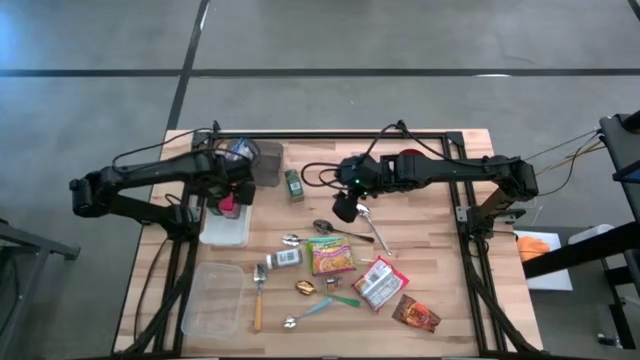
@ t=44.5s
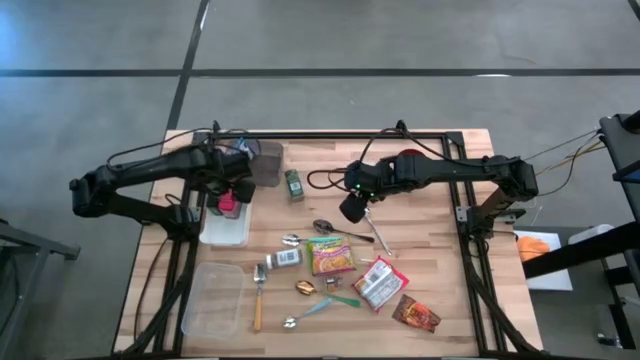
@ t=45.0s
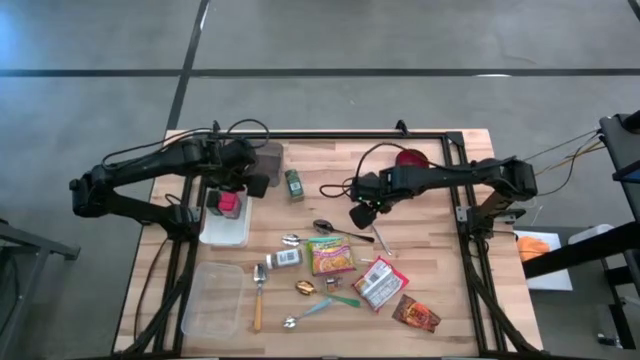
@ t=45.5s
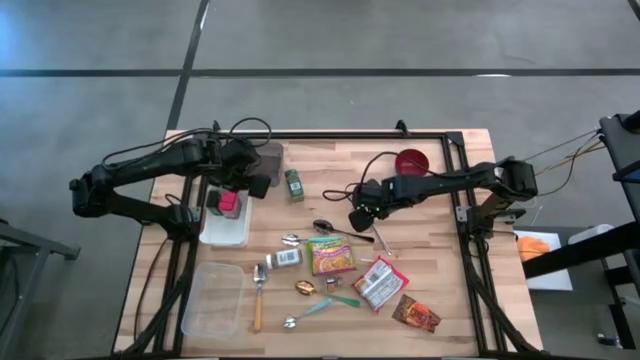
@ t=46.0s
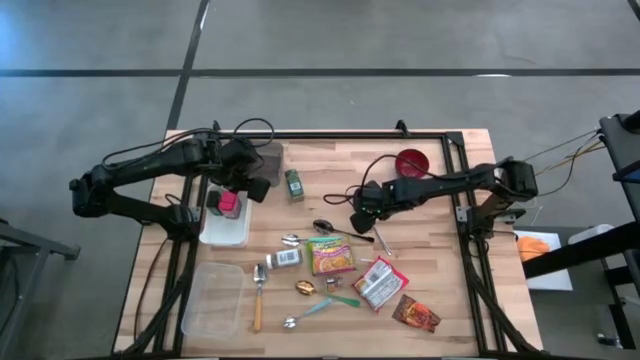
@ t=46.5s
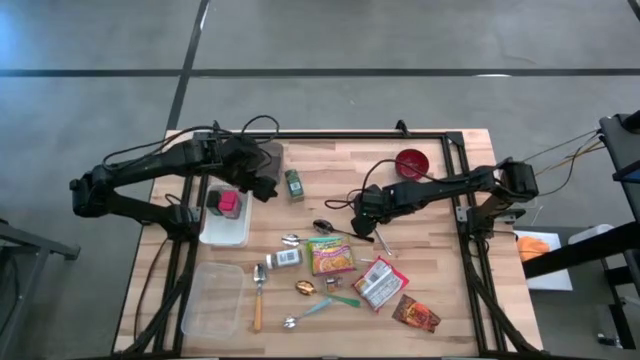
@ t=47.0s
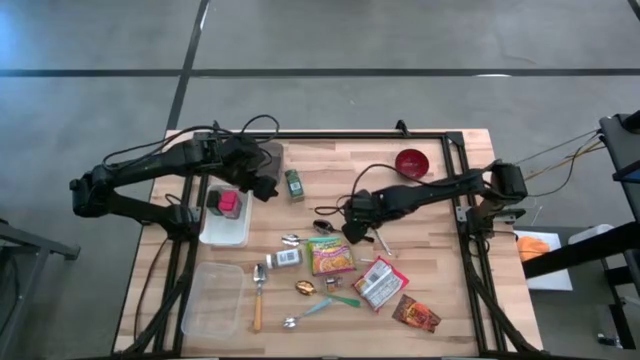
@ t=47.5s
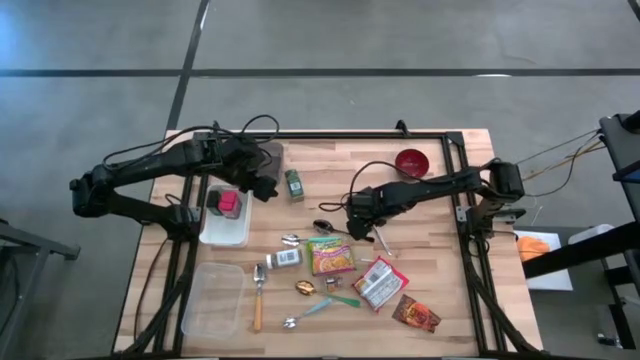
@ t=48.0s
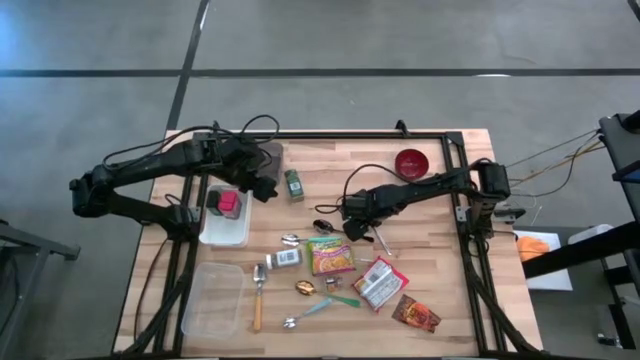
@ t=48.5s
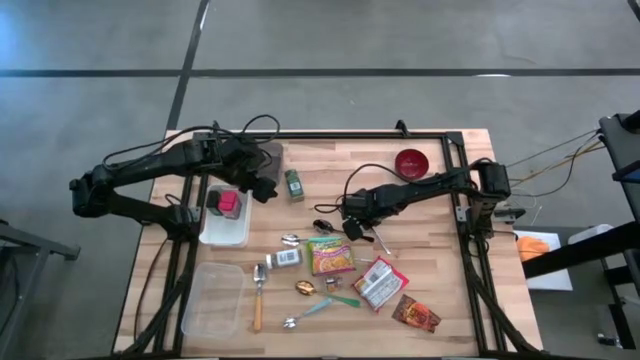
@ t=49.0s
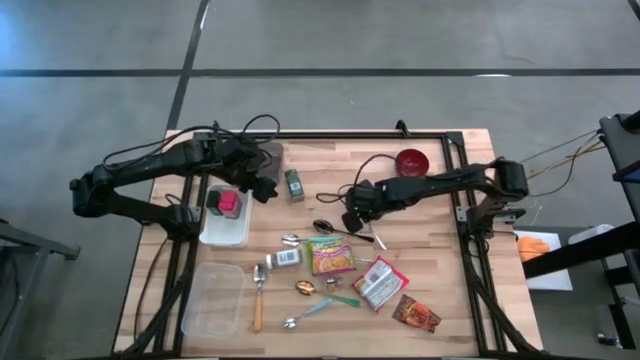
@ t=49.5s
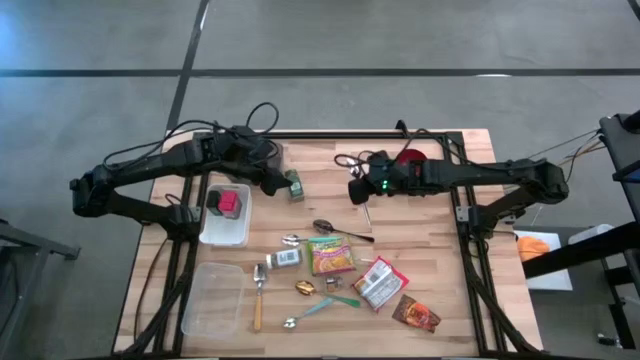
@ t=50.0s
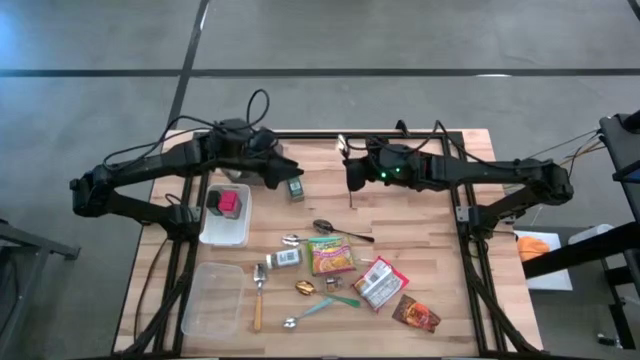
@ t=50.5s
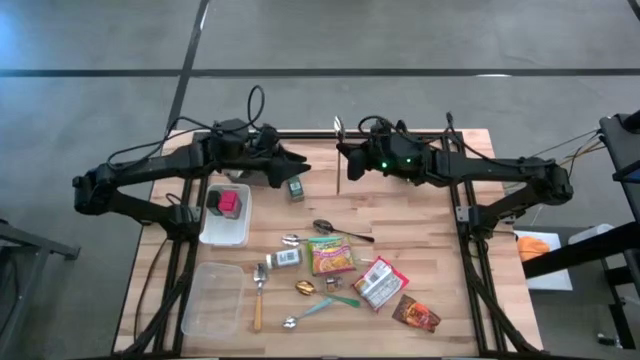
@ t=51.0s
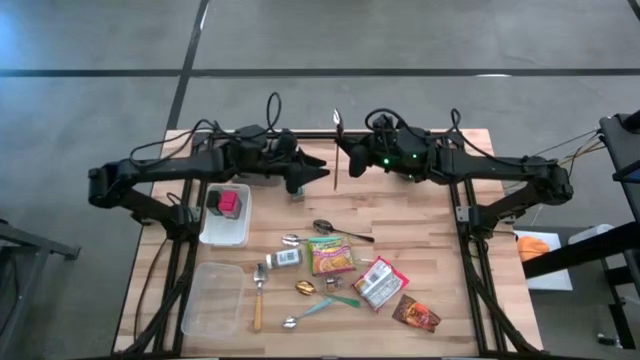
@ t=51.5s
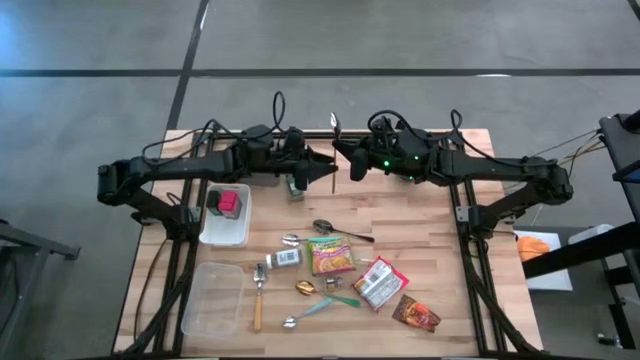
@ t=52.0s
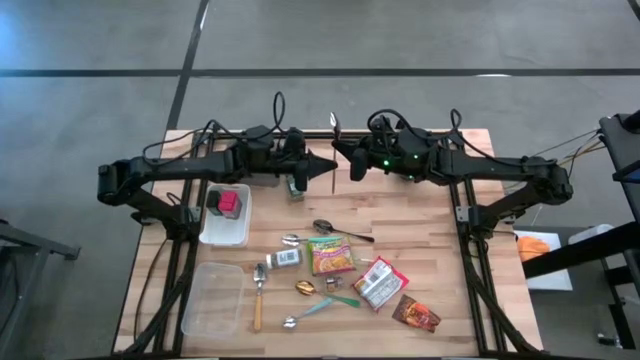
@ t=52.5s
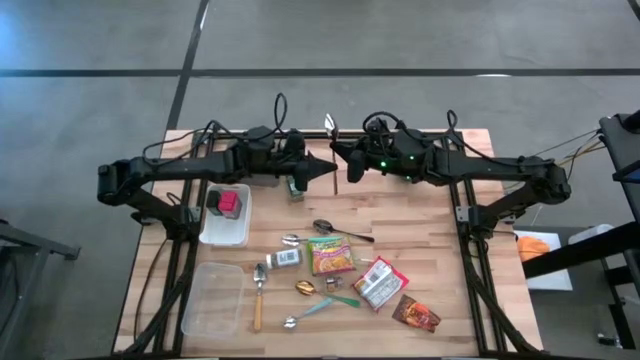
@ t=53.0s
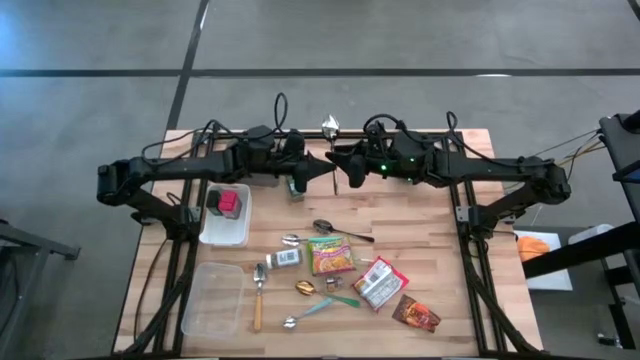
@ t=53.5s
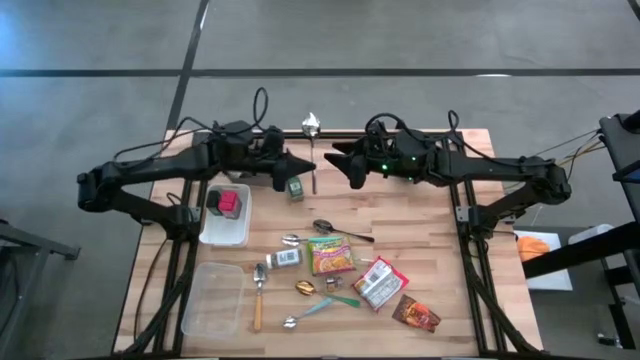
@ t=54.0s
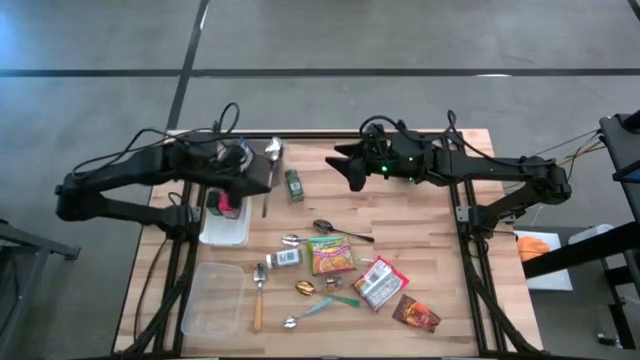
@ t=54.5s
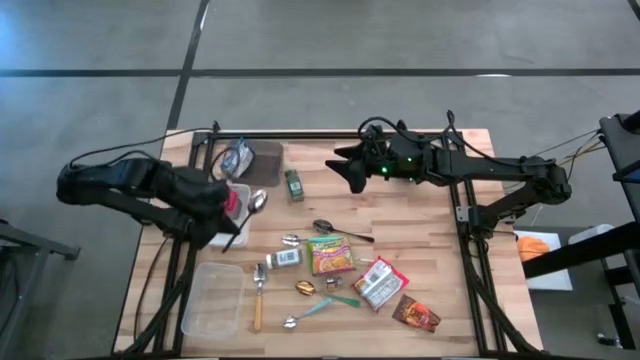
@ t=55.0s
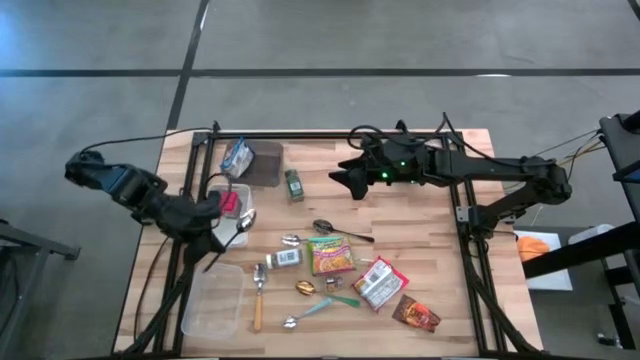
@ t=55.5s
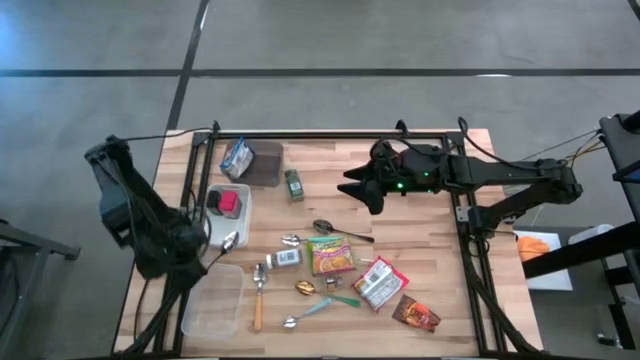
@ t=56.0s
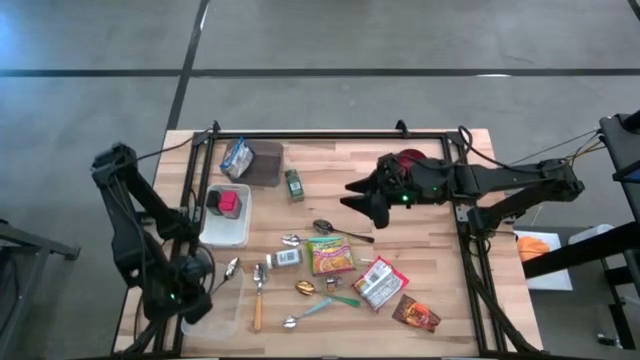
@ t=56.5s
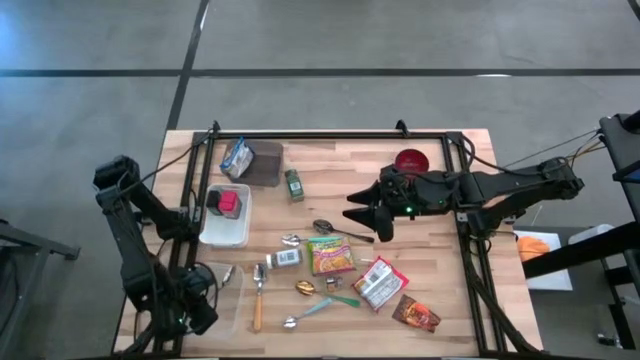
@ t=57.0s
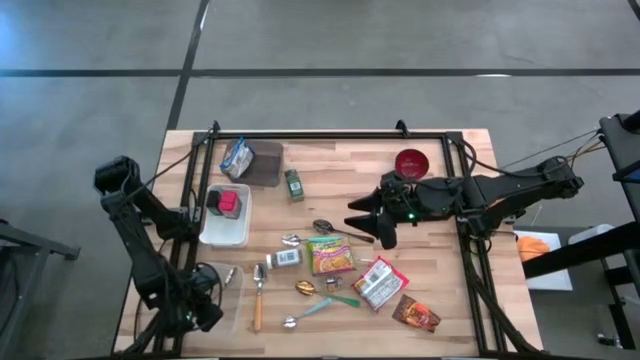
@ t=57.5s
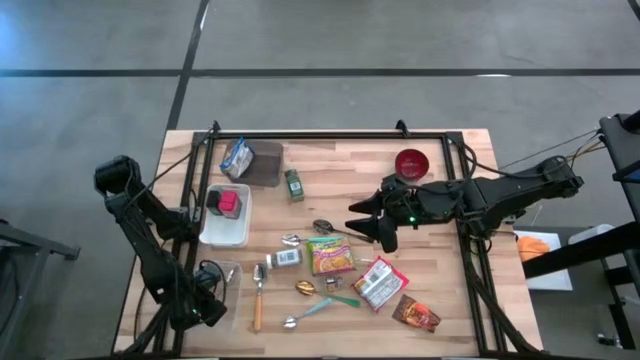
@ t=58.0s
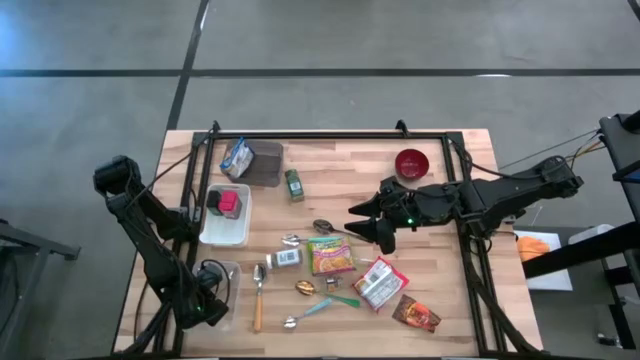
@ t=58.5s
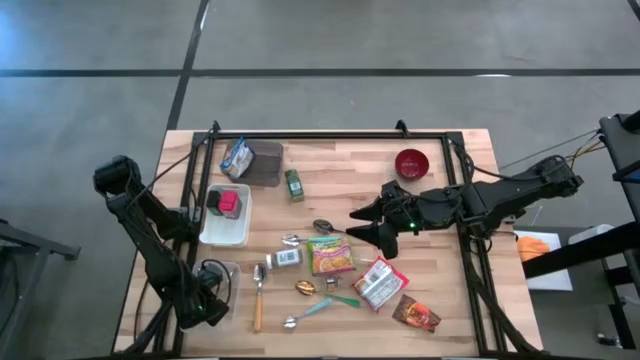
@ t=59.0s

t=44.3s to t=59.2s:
Put the silver spoon into the transparent bin
